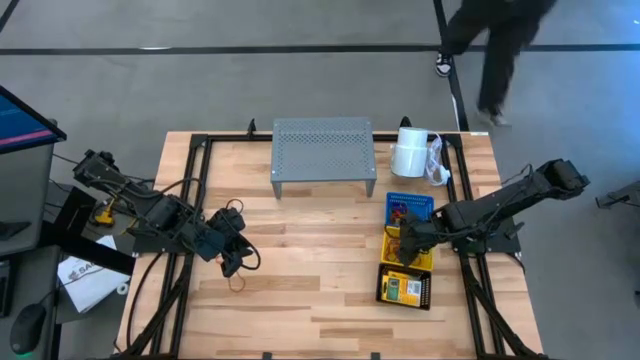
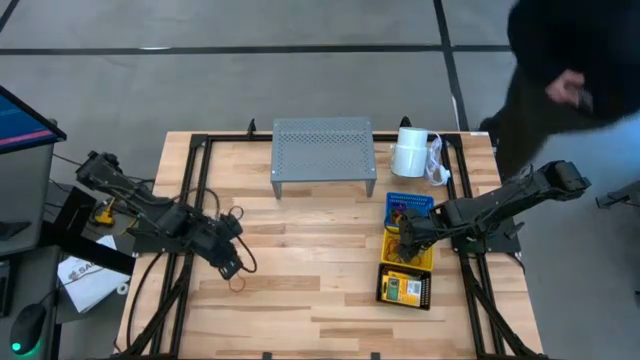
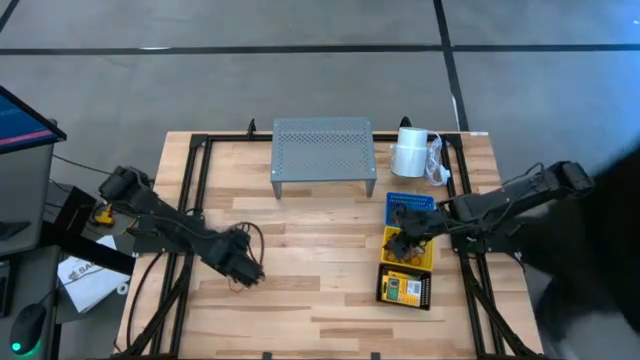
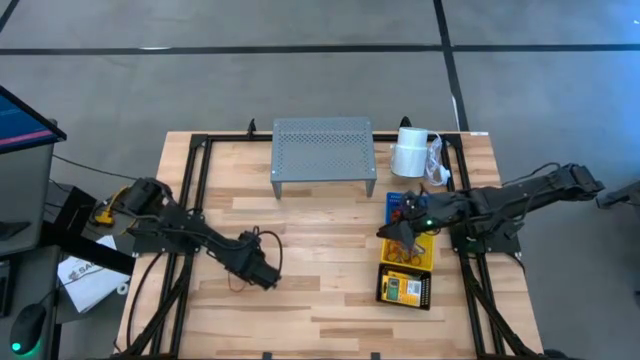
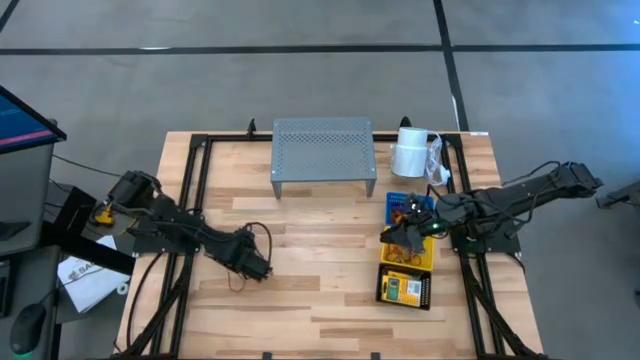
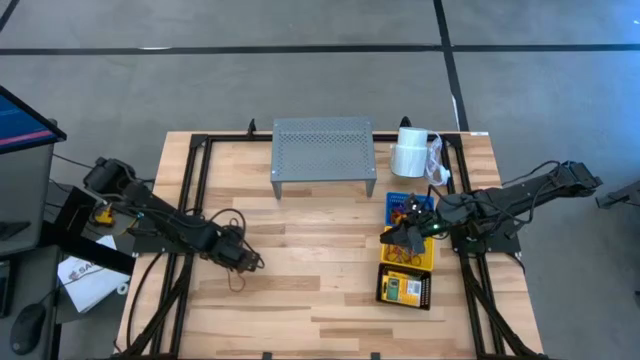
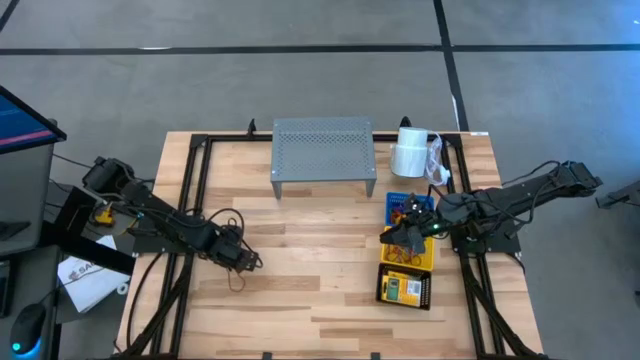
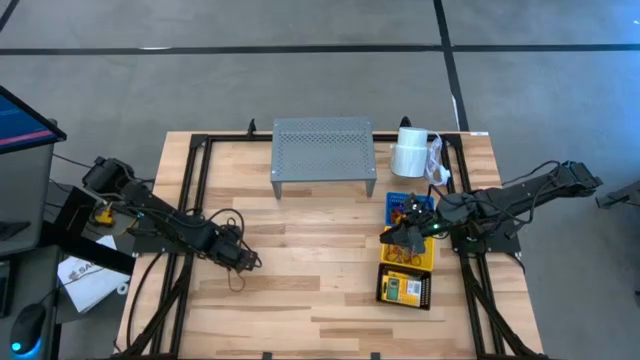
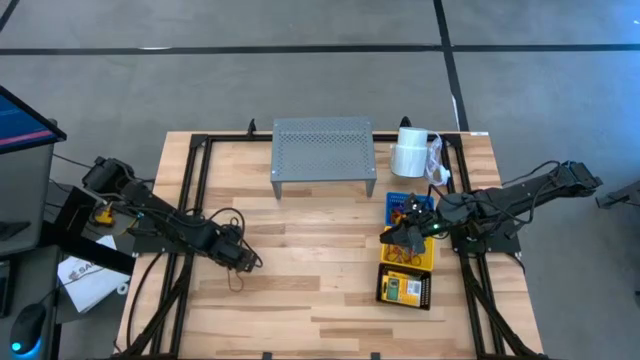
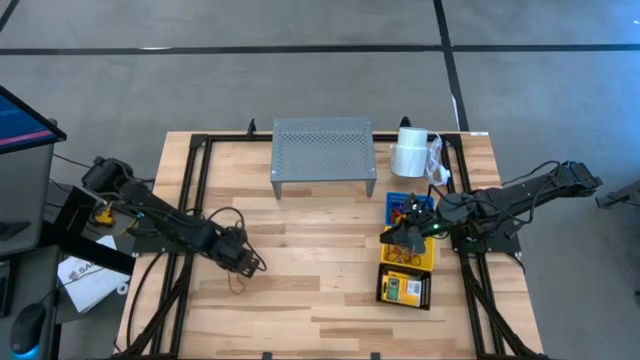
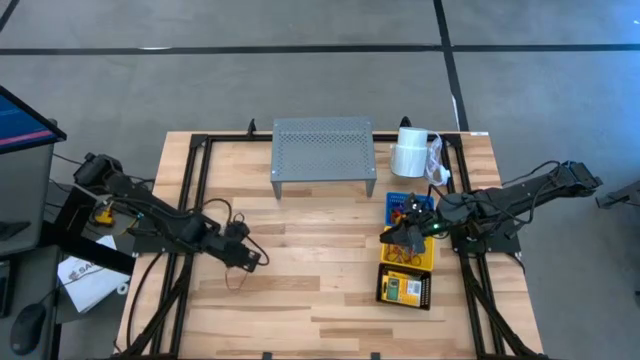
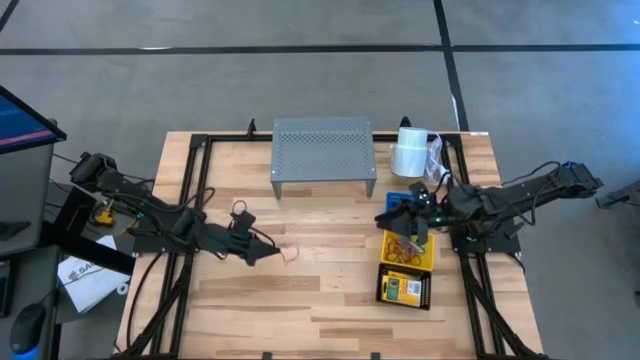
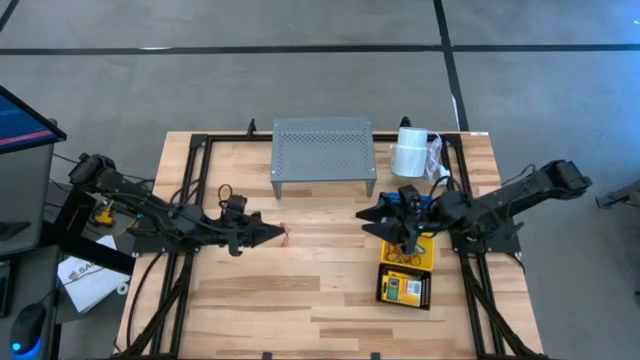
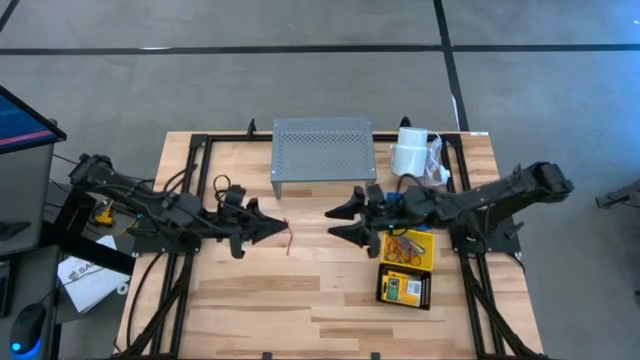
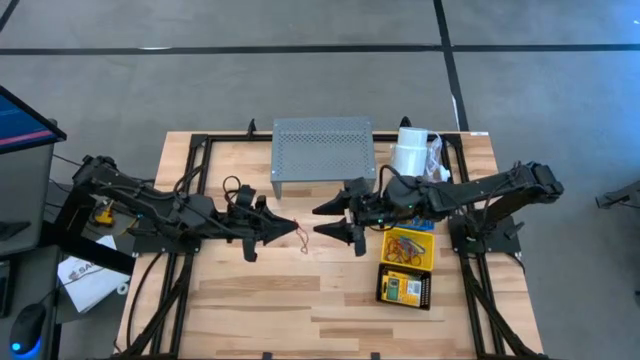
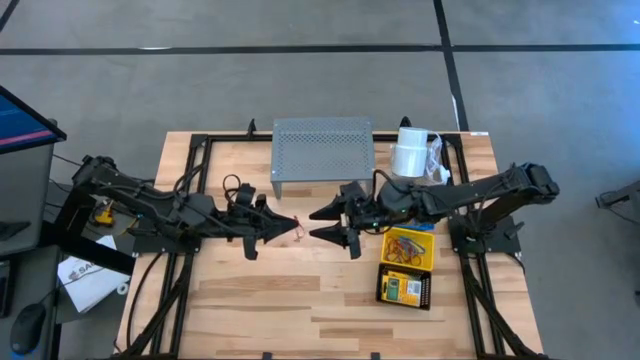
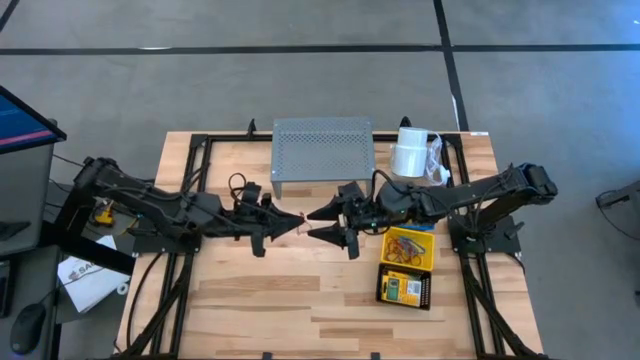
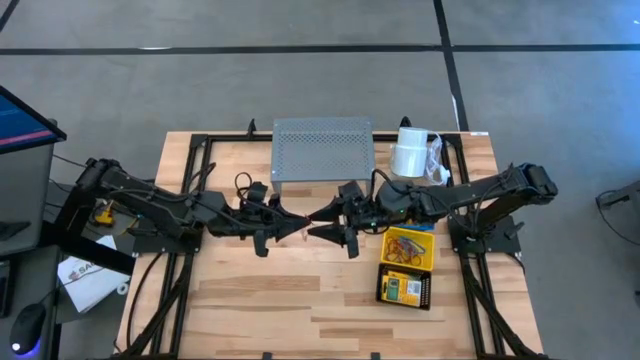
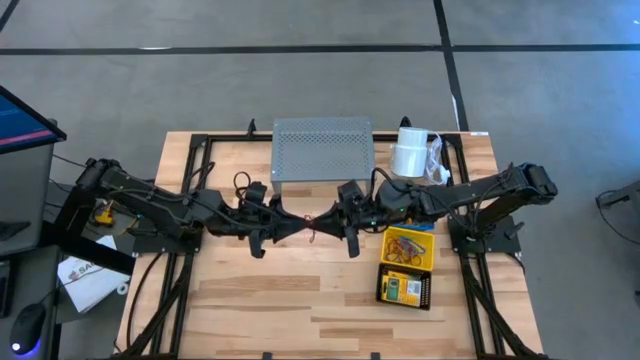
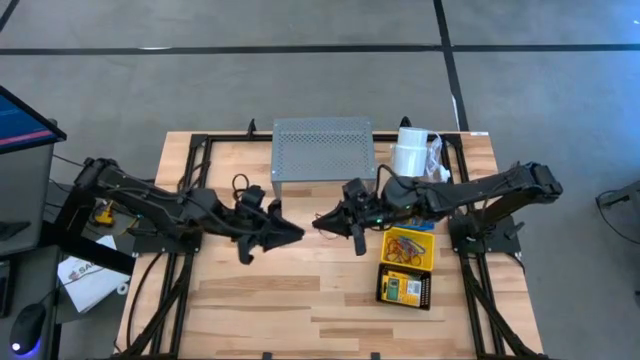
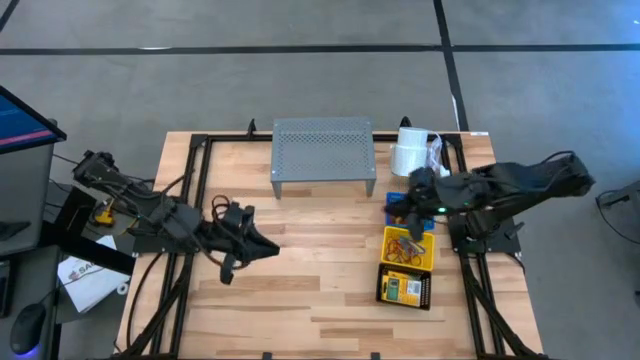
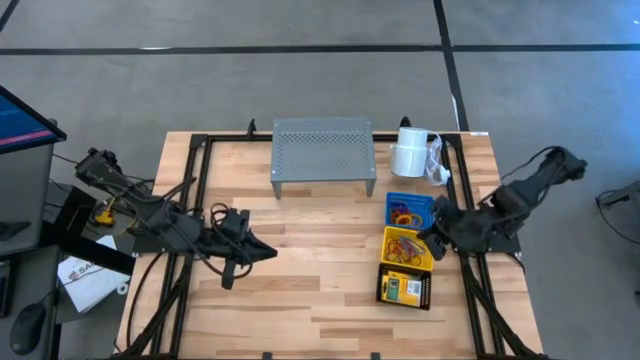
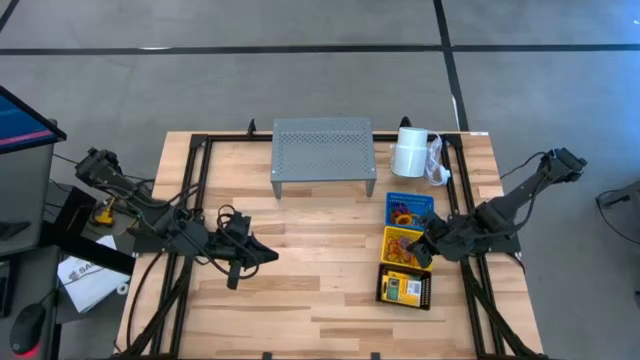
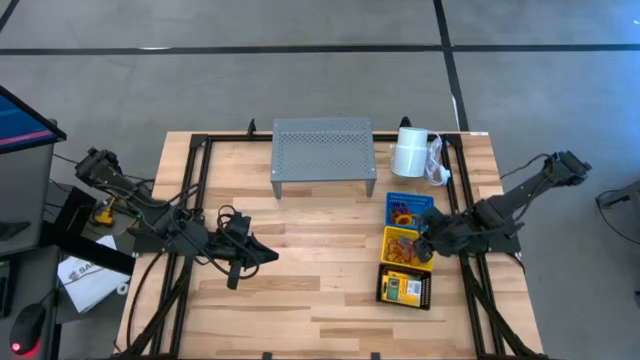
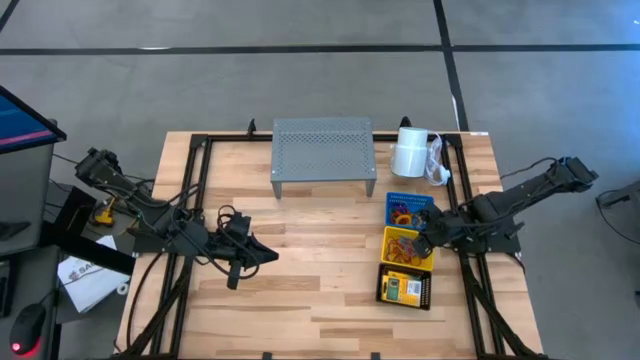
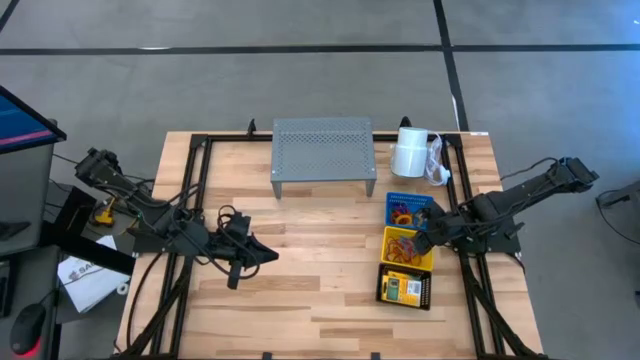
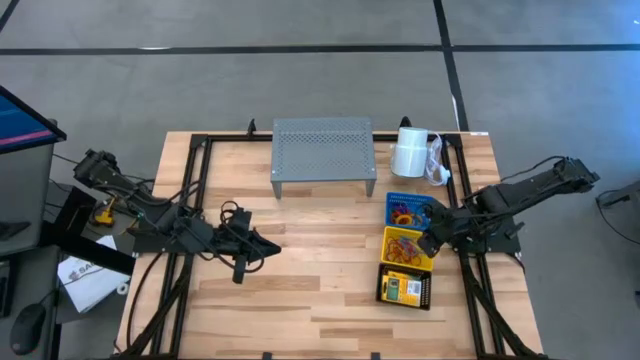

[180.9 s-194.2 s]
Task: Pick & Place Office Desk Supplies
Put the red rubber band into the yellow basket

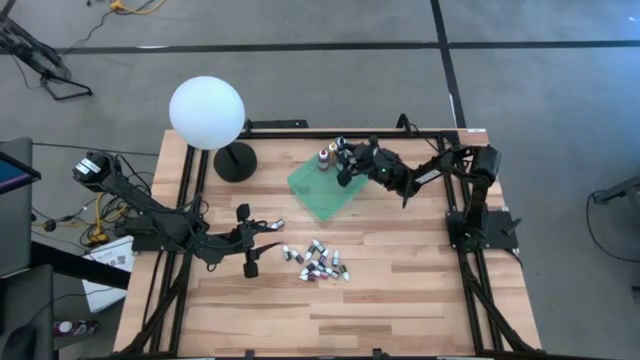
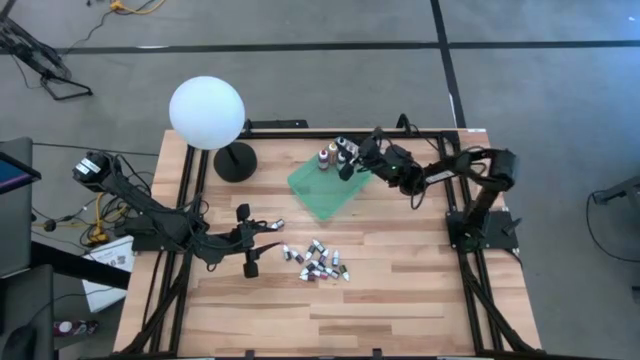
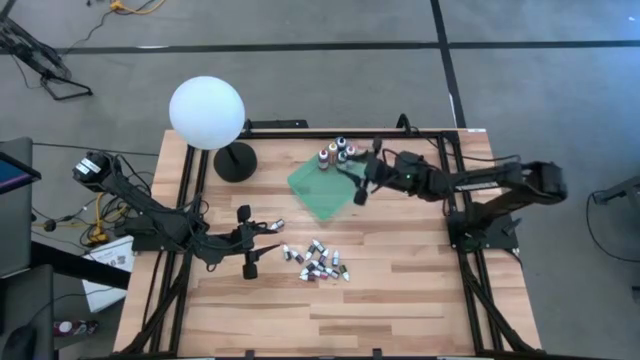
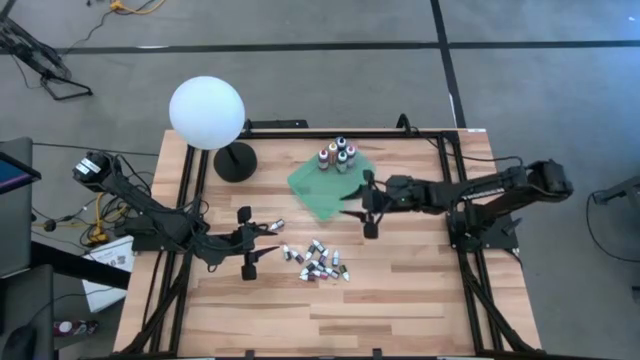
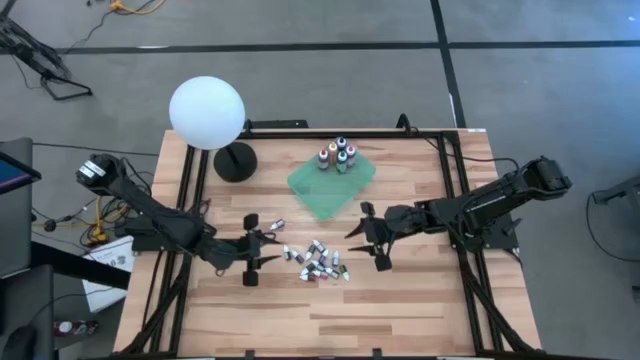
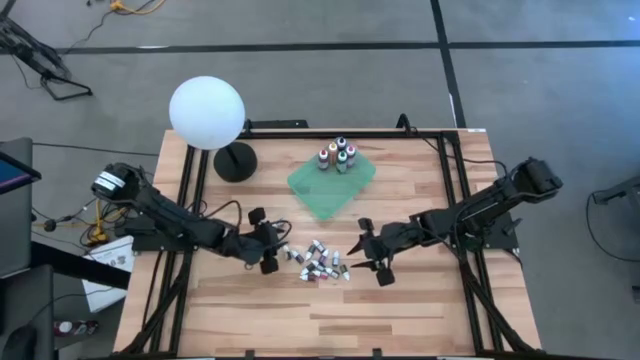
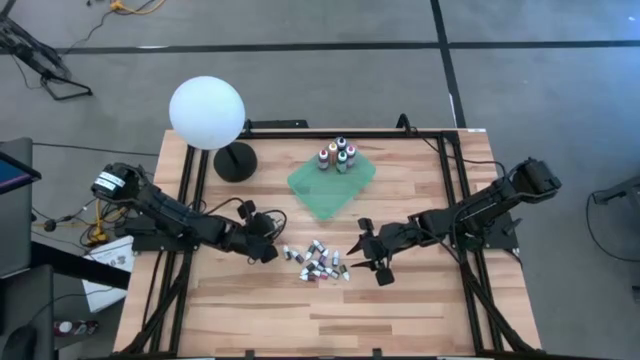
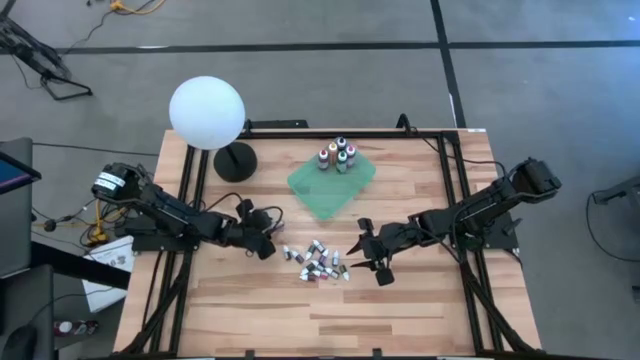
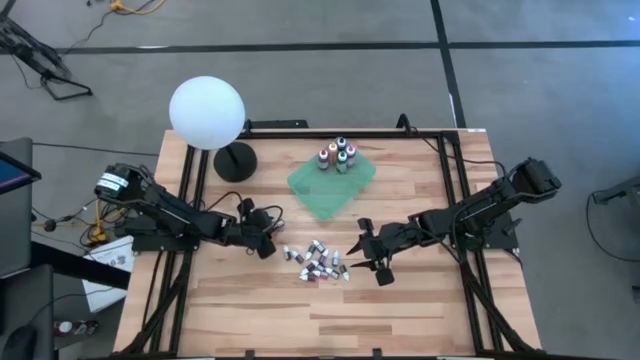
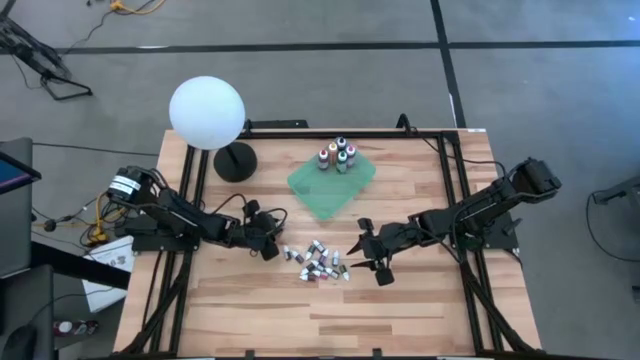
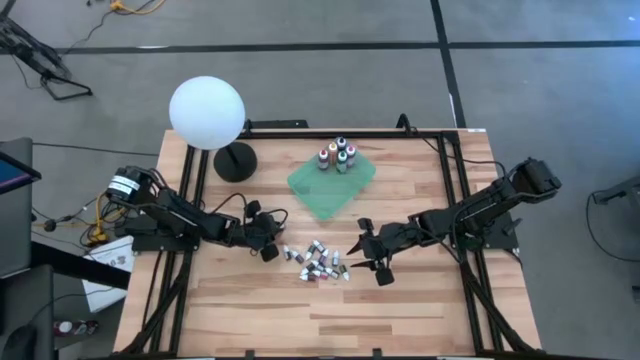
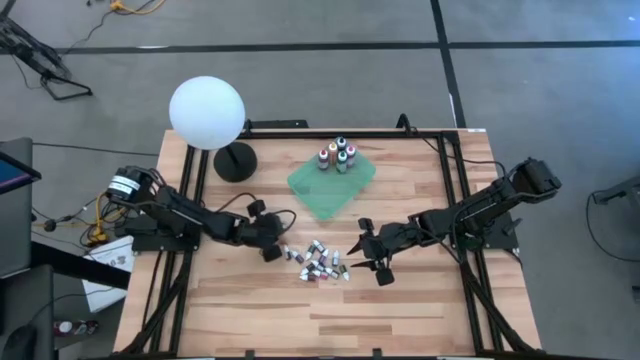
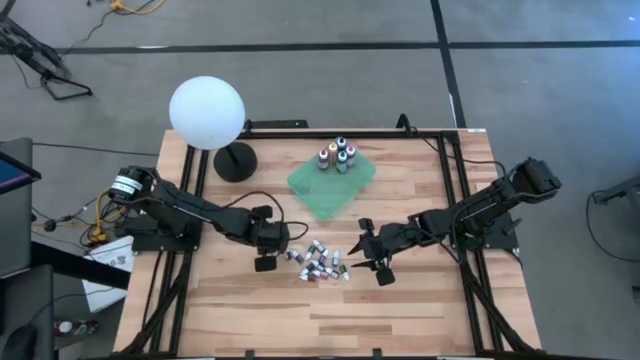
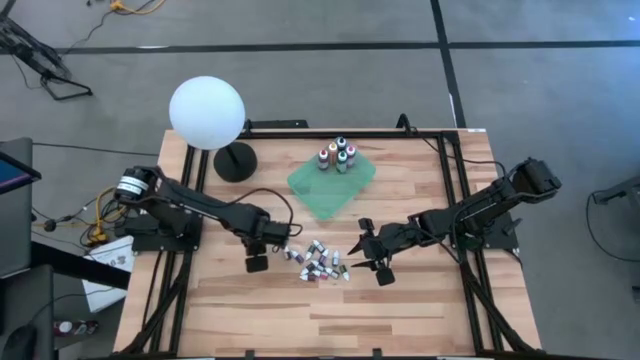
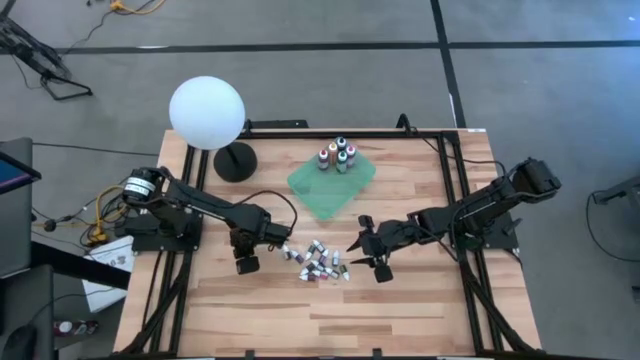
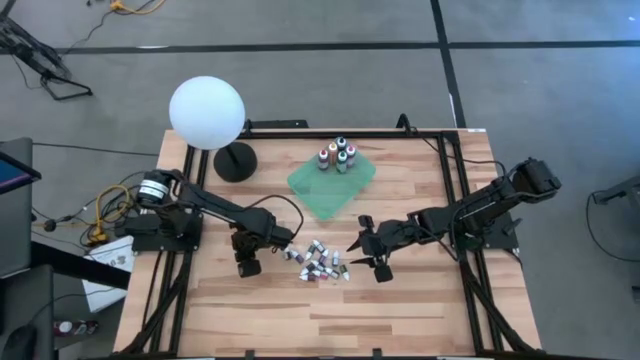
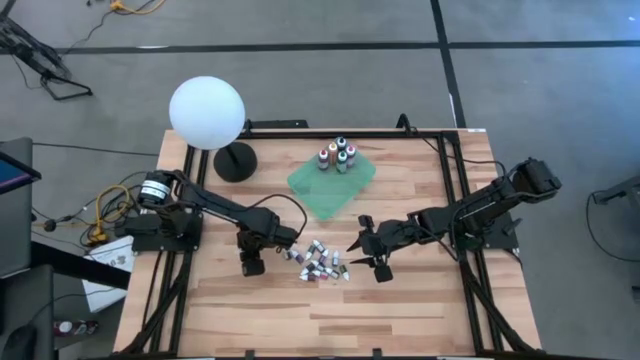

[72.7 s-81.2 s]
Task: Pick & Place food coloring
Put the top red food coloring bottle into the green bin
